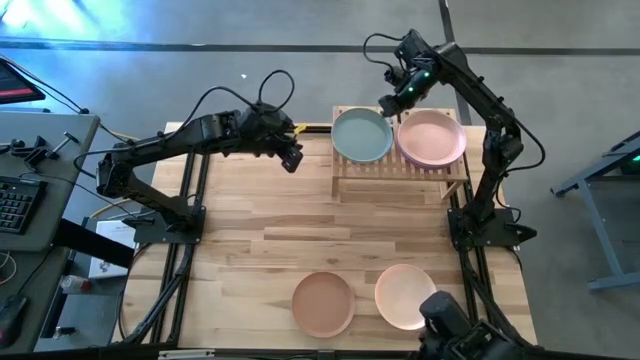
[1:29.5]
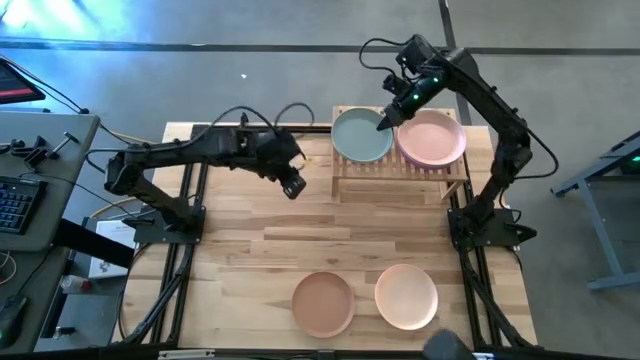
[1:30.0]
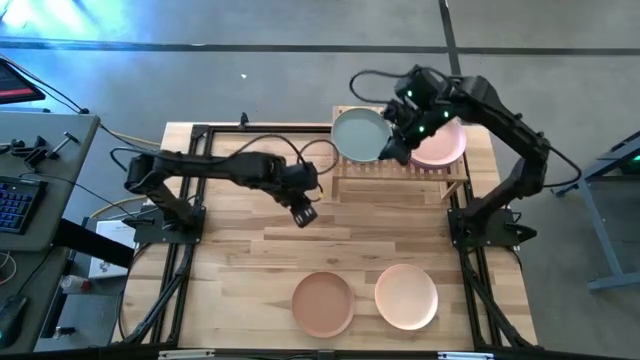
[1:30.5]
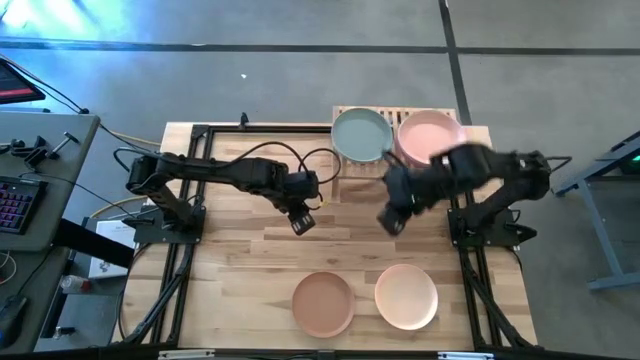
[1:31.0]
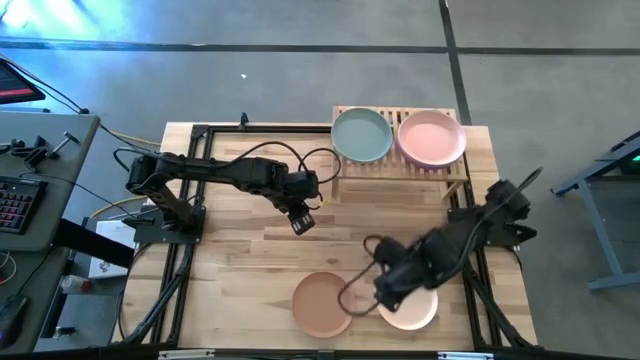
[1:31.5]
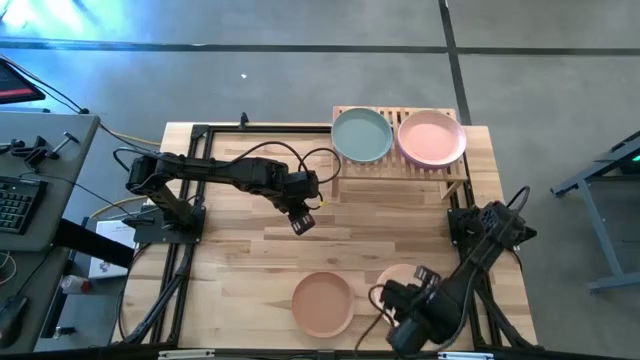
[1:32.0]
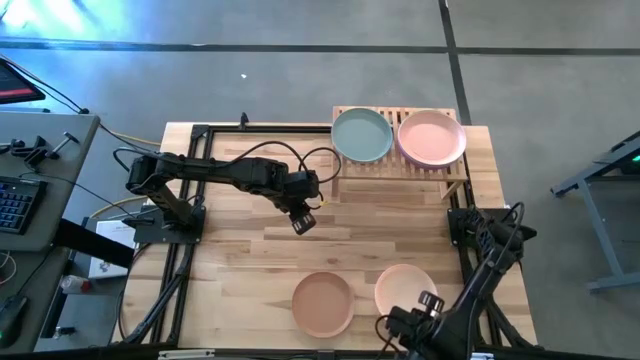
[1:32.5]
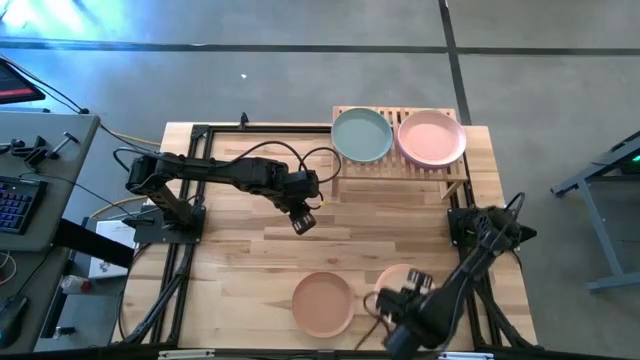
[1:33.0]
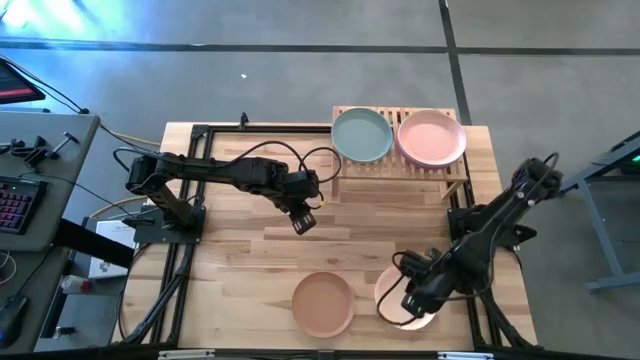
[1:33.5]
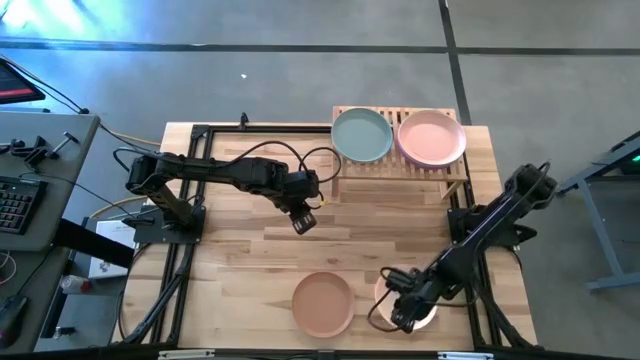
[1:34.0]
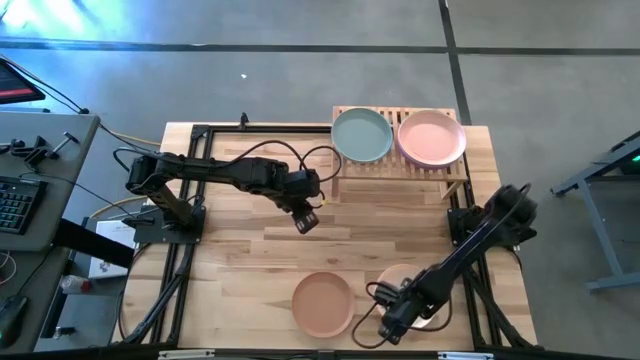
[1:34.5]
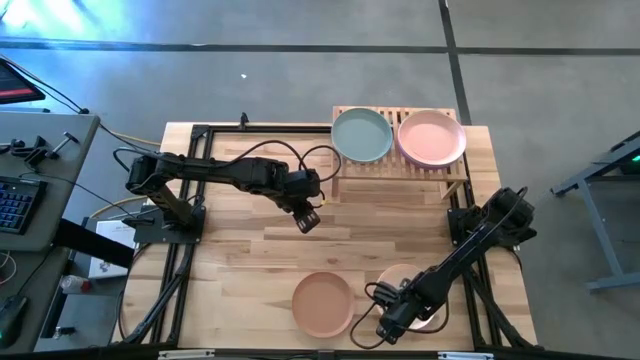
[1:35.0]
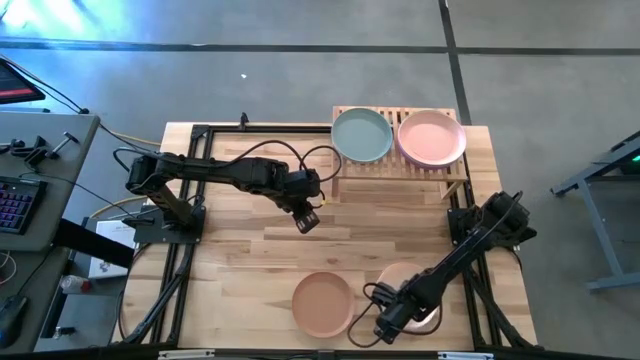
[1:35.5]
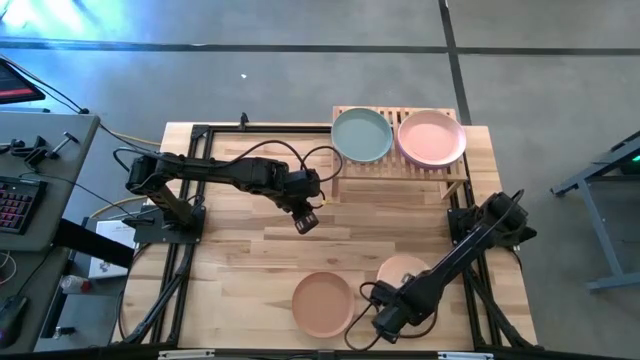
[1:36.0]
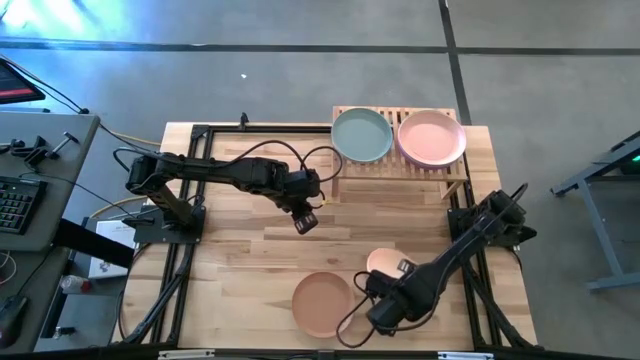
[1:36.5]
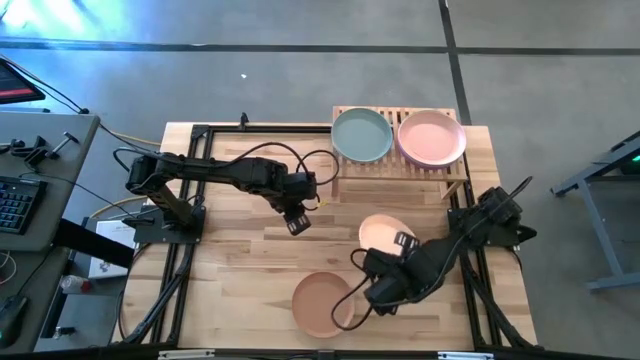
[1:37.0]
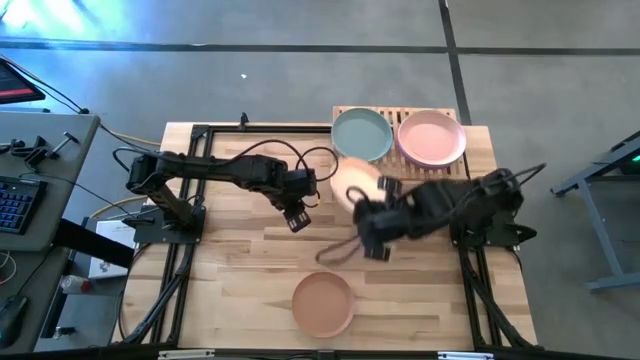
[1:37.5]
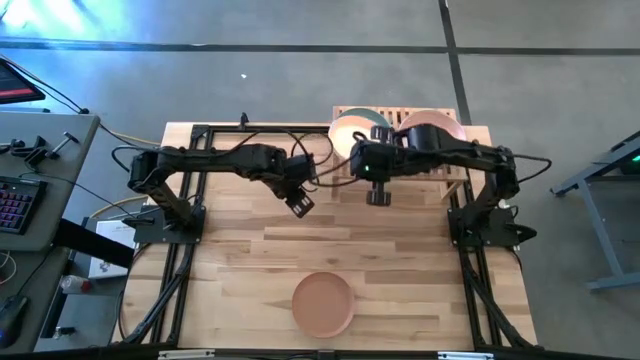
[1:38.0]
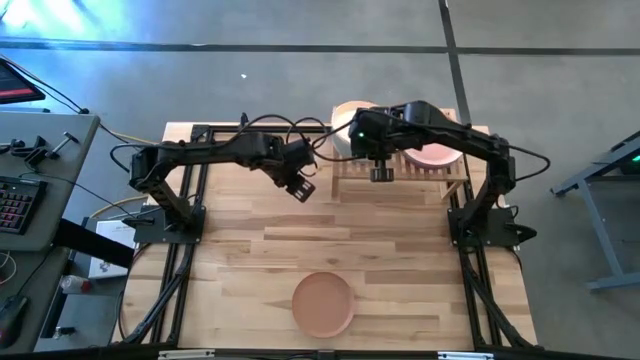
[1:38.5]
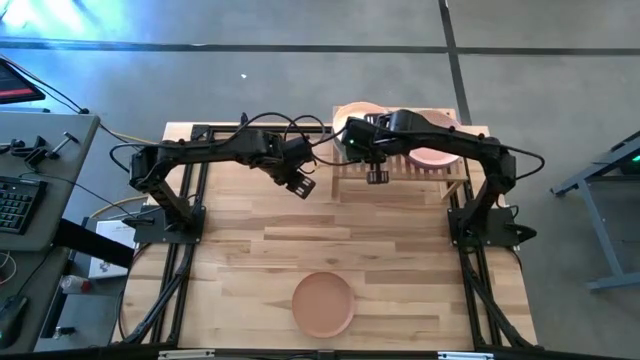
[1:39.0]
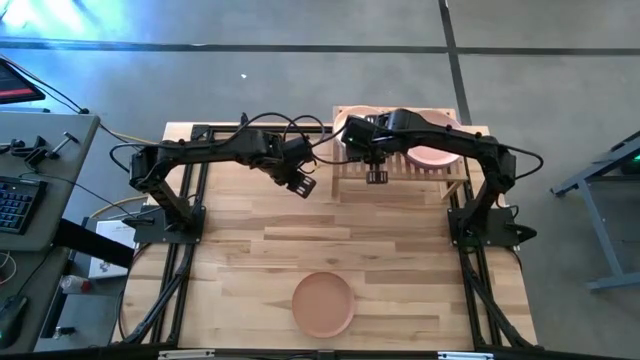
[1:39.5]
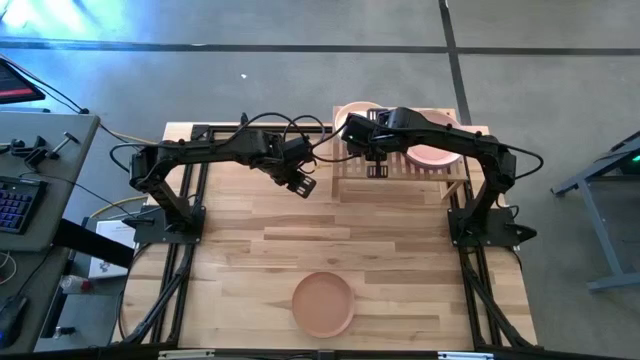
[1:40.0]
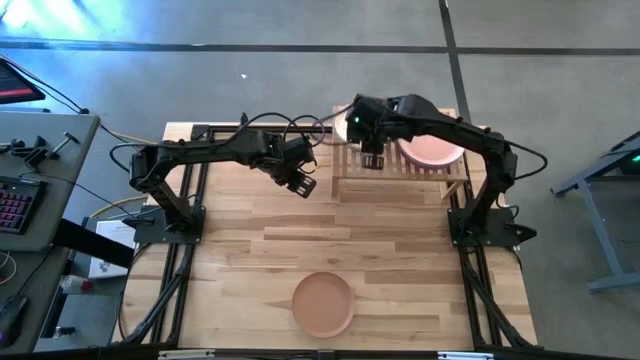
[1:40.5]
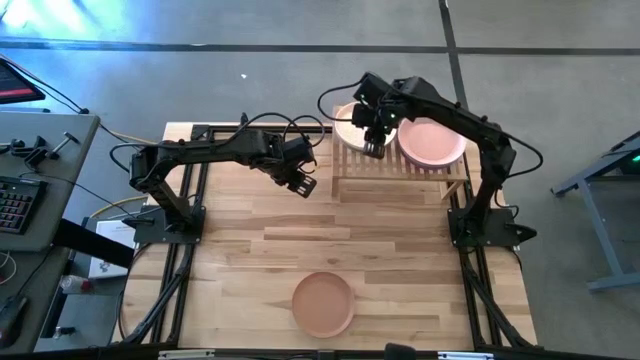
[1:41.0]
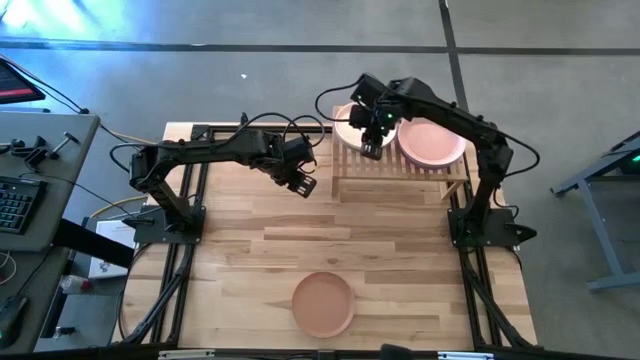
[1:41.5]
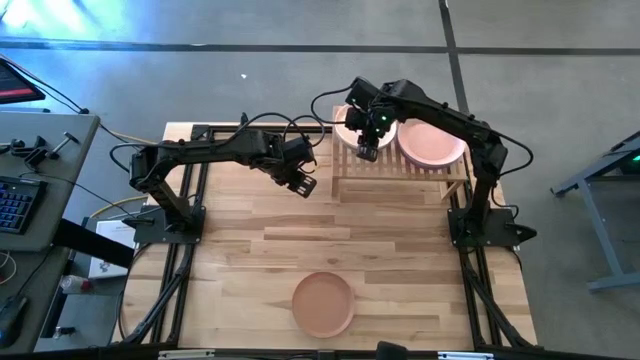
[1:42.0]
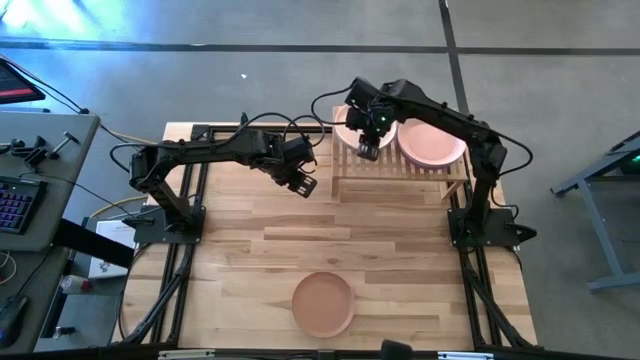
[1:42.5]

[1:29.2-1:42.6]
Task: Place and stack plates onto a shelf
Stack the white plate on the blue plate on the shelf

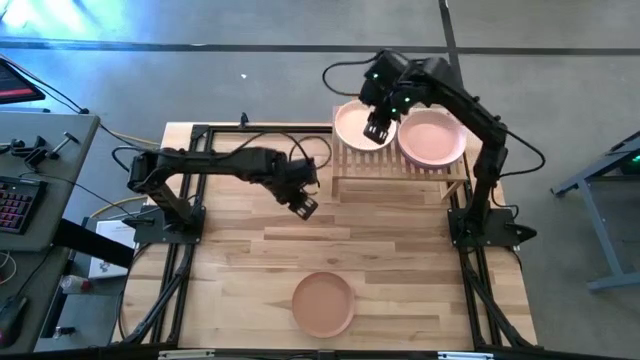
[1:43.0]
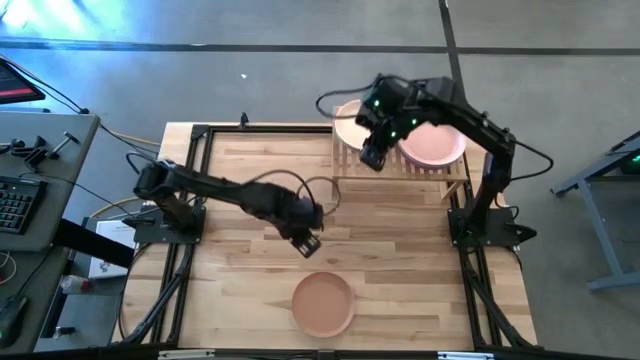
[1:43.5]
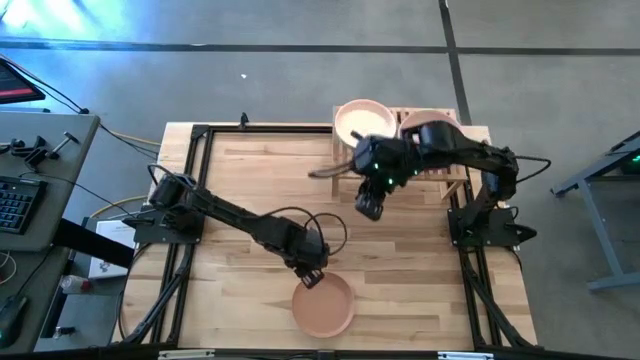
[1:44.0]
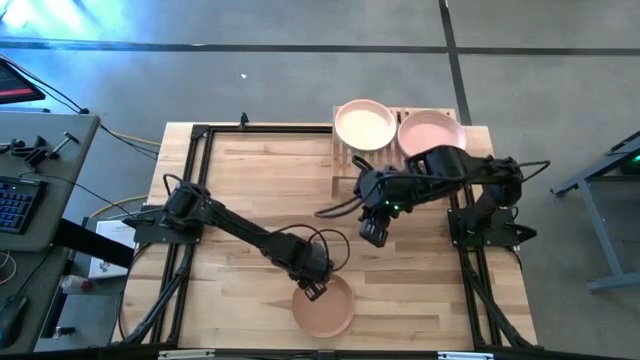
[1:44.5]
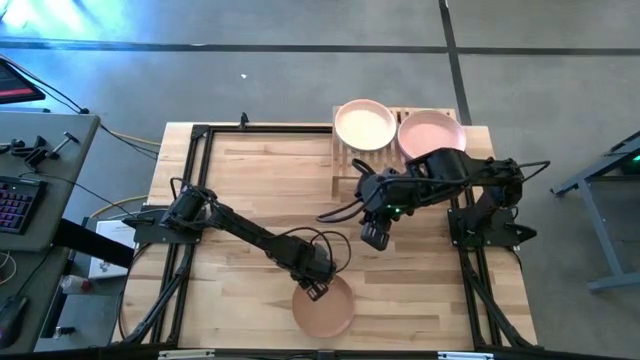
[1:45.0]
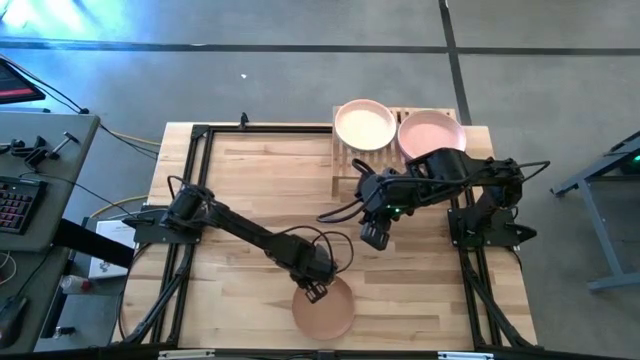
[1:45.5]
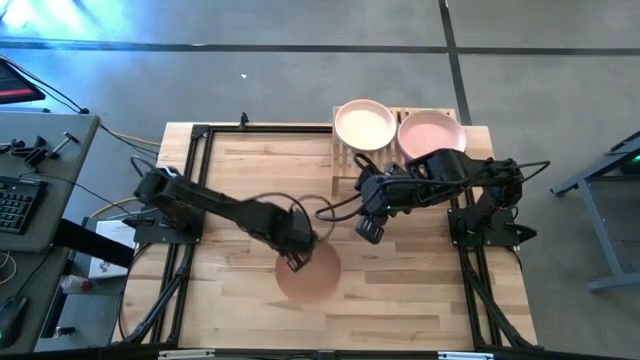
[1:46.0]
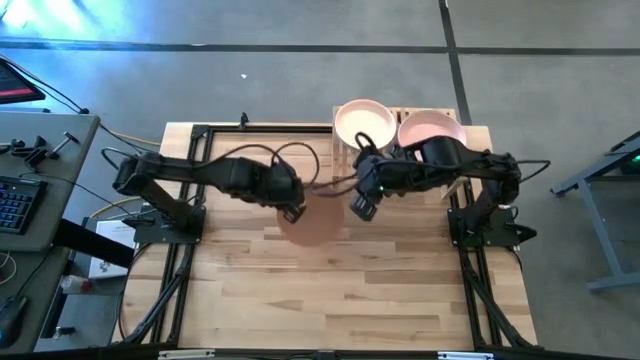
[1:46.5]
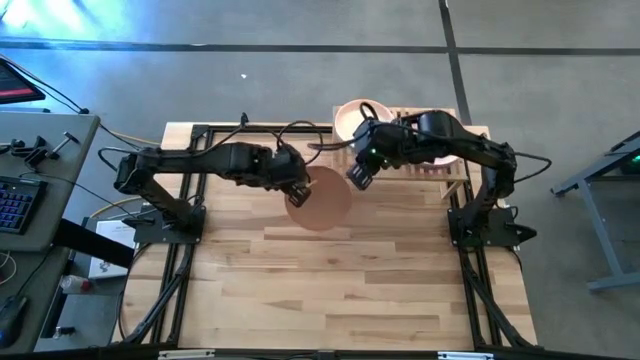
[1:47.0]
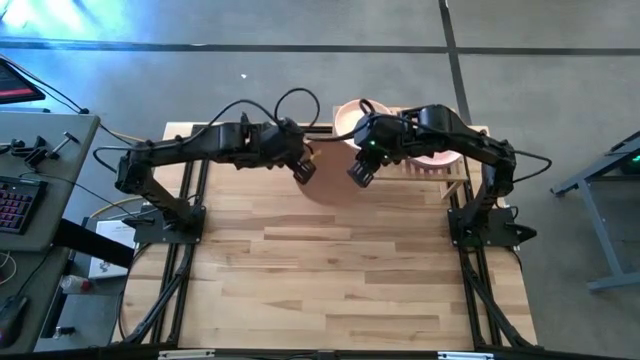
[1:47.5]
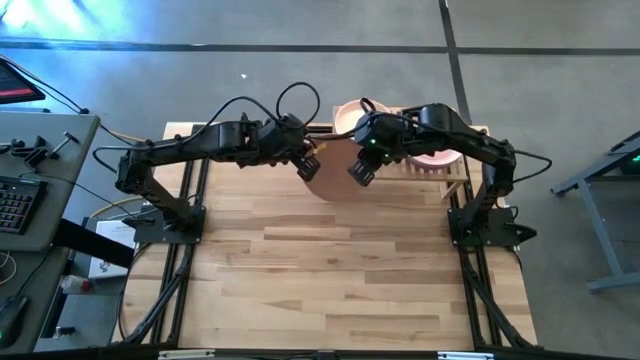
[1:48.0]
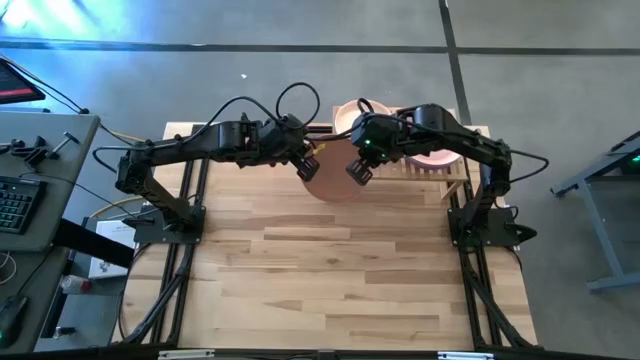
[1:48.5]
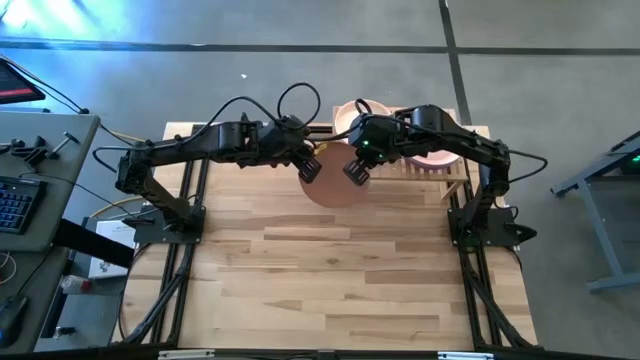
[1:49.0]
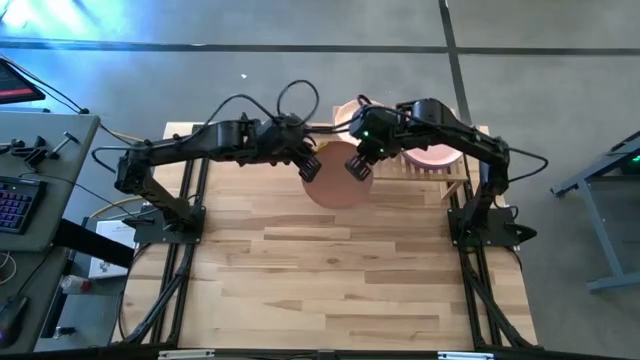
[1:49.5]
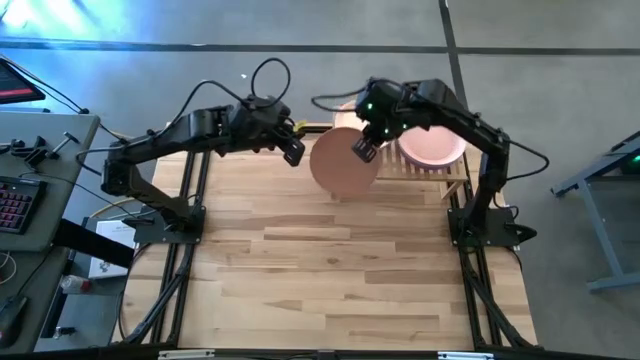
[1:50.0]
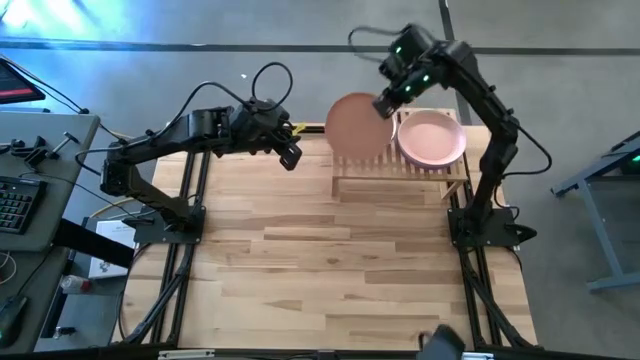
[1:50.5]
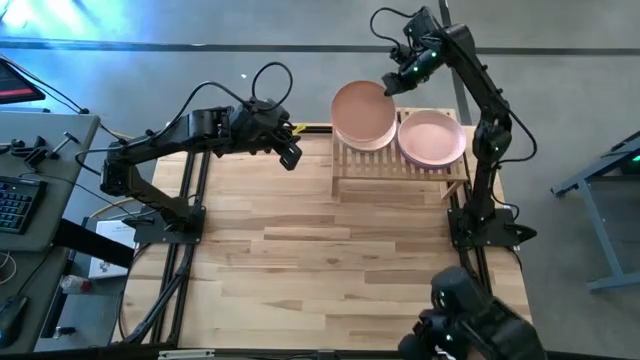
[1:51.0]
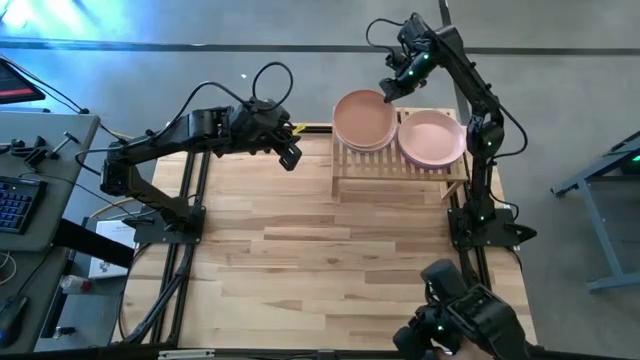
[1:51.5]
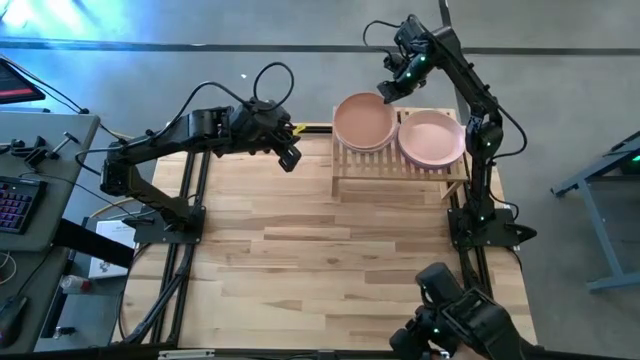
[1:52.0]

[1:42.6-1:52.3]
Stack the brown plate on the white plate on the shelf
